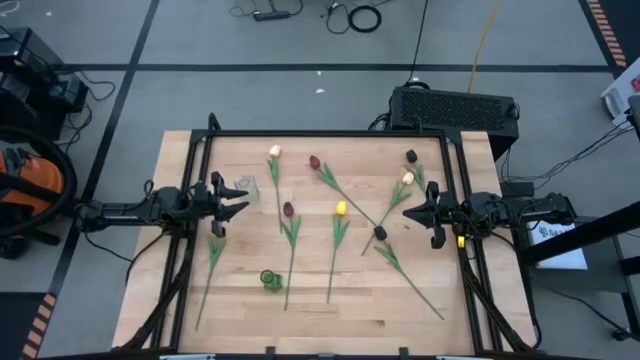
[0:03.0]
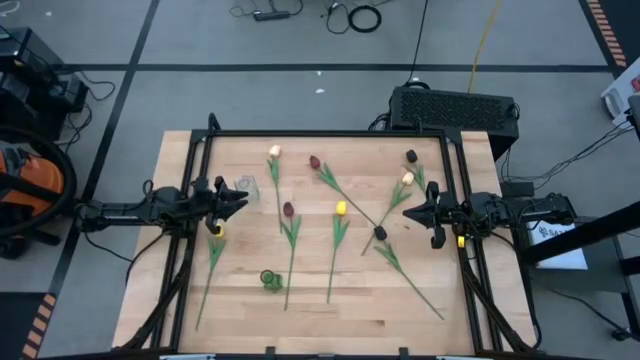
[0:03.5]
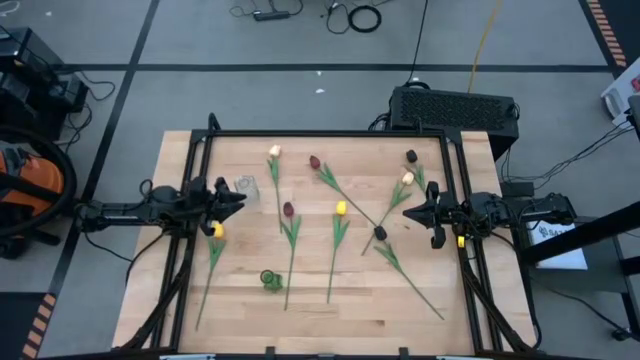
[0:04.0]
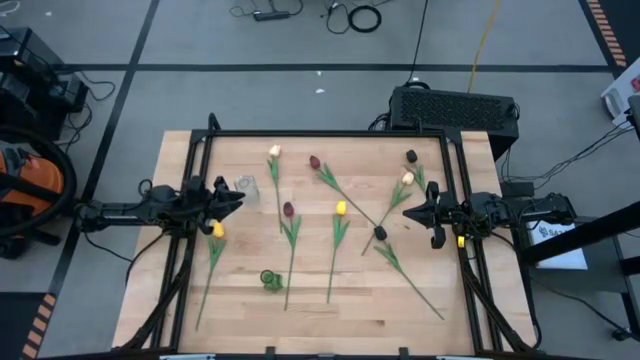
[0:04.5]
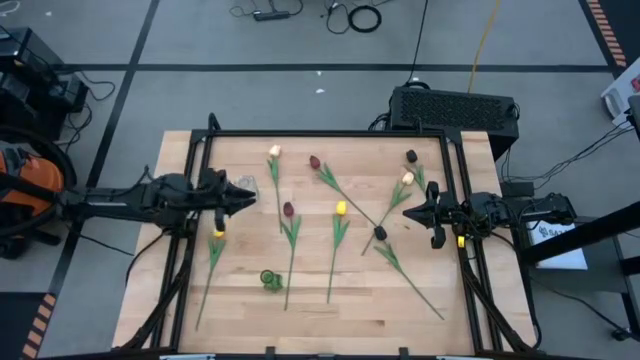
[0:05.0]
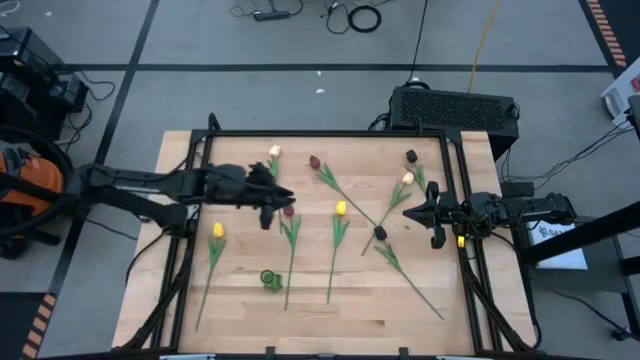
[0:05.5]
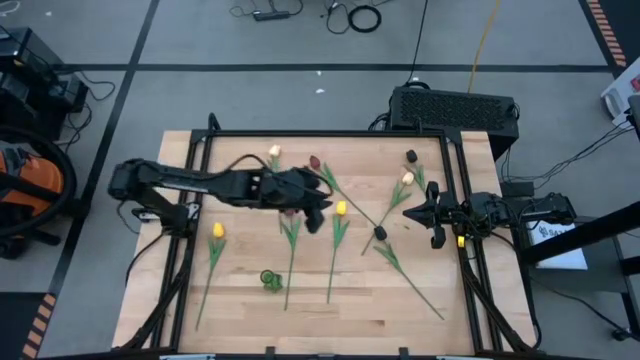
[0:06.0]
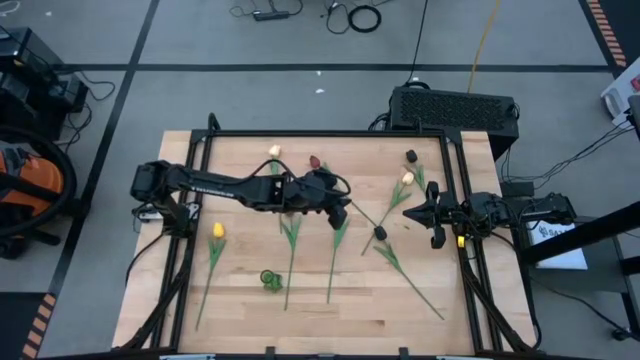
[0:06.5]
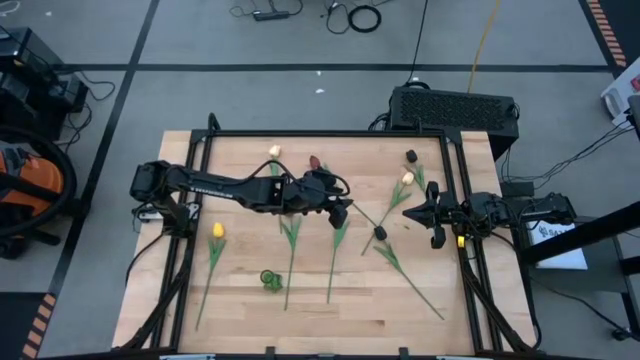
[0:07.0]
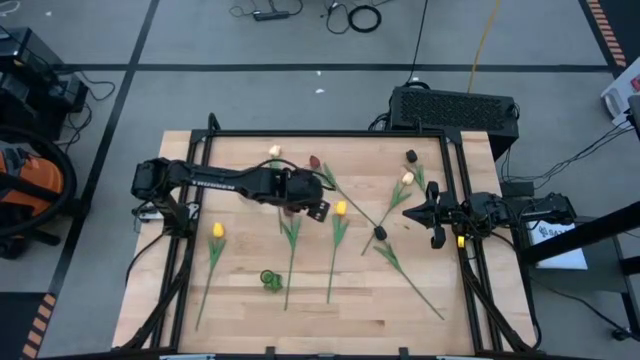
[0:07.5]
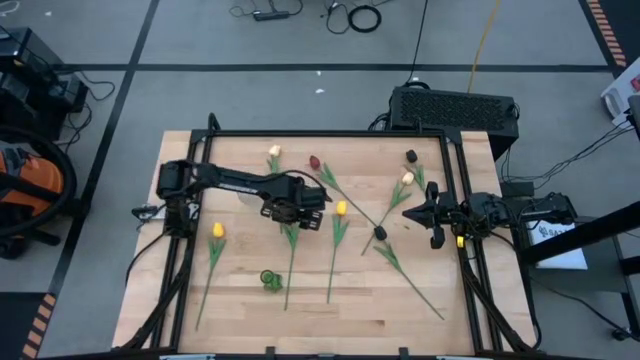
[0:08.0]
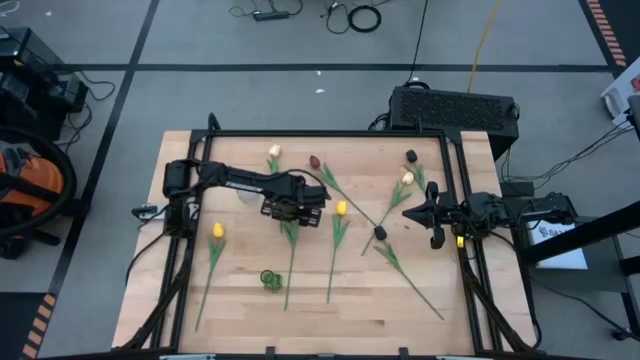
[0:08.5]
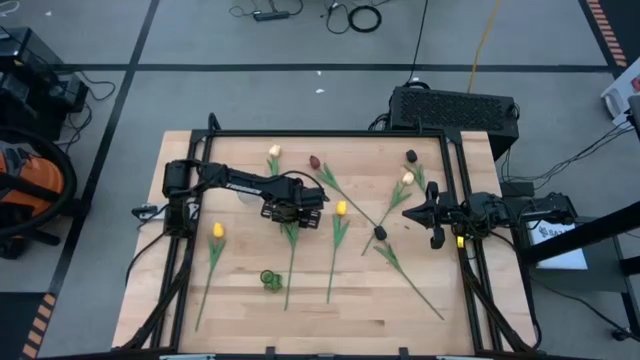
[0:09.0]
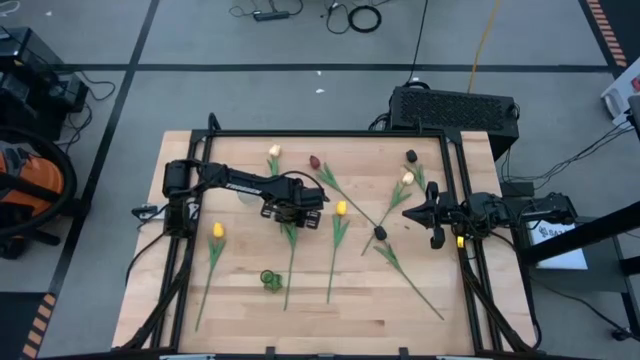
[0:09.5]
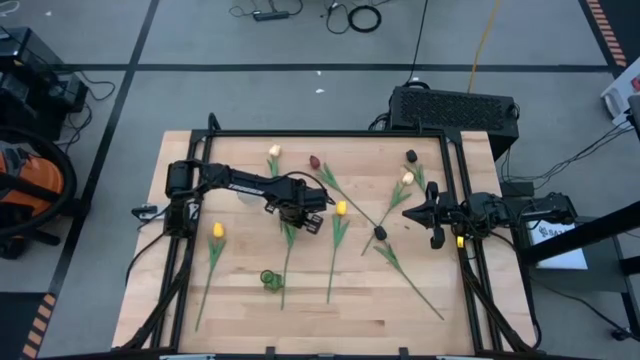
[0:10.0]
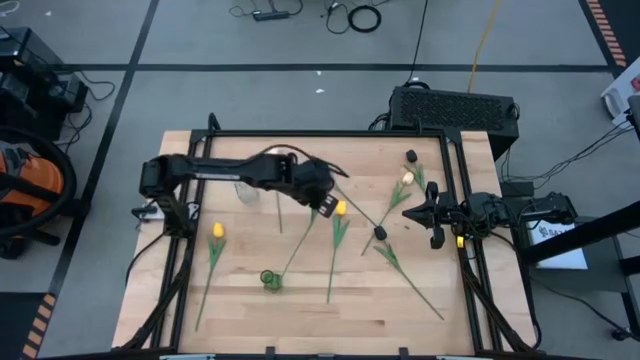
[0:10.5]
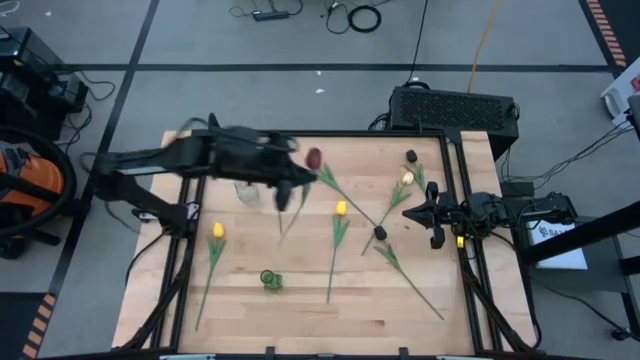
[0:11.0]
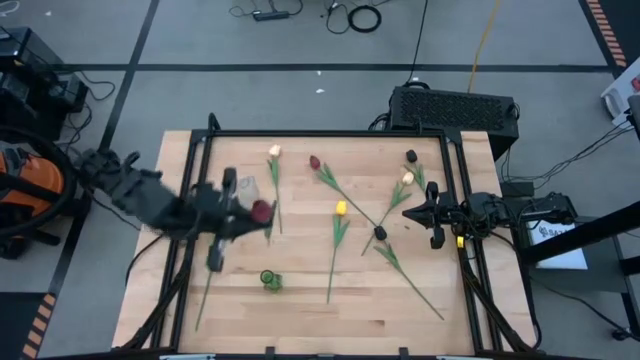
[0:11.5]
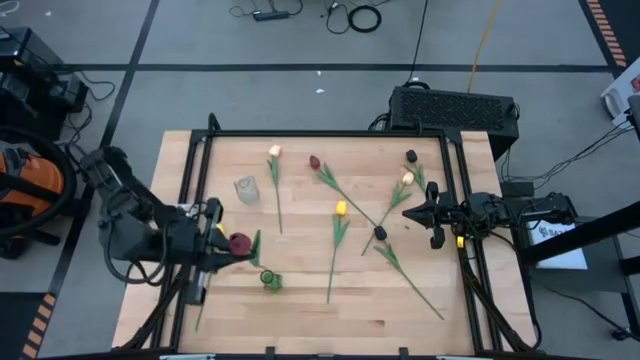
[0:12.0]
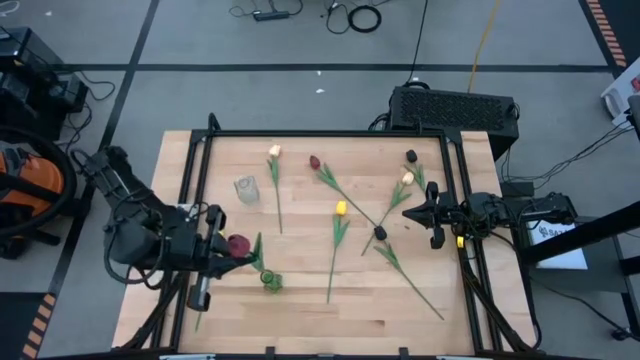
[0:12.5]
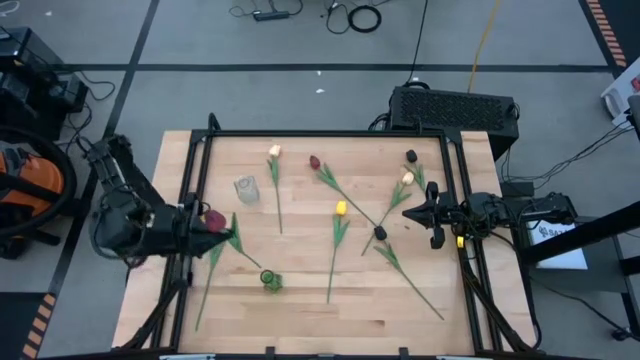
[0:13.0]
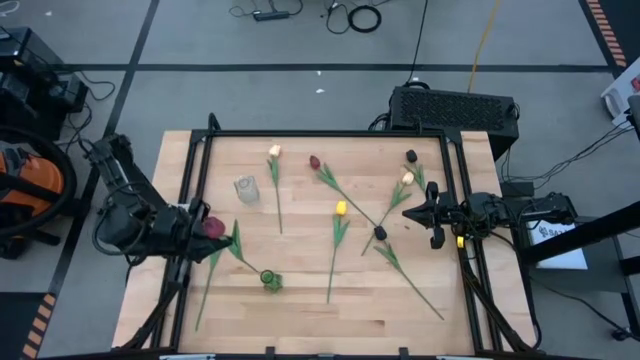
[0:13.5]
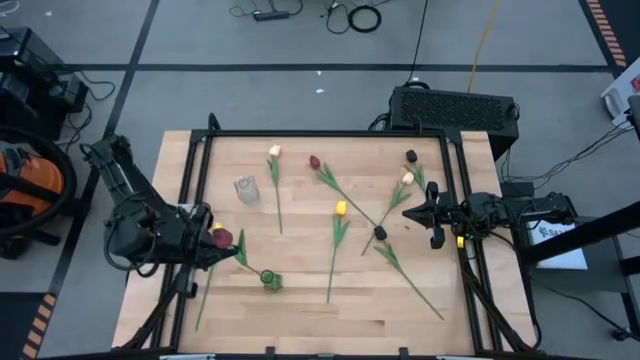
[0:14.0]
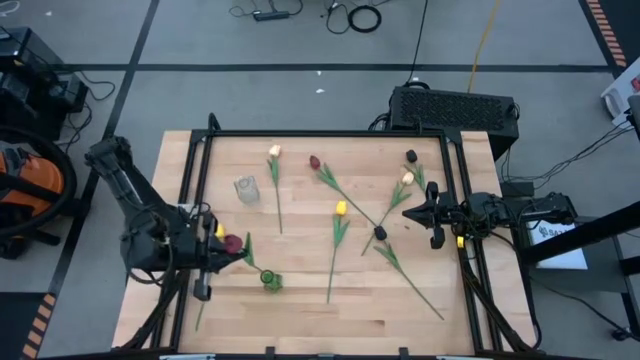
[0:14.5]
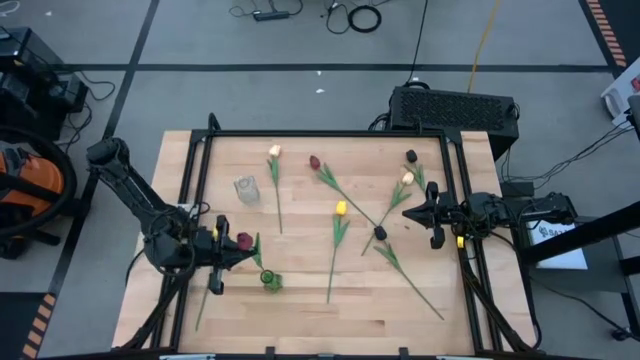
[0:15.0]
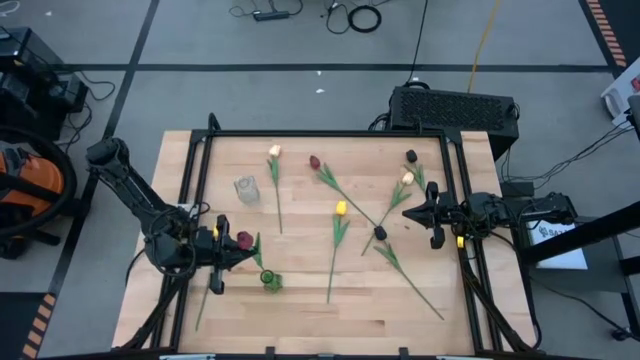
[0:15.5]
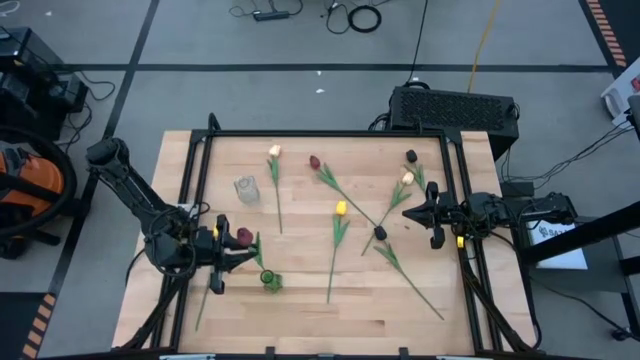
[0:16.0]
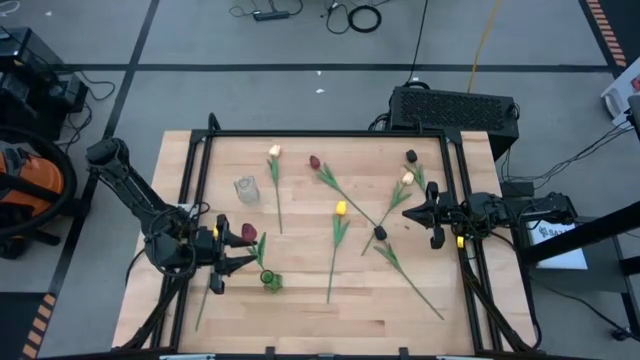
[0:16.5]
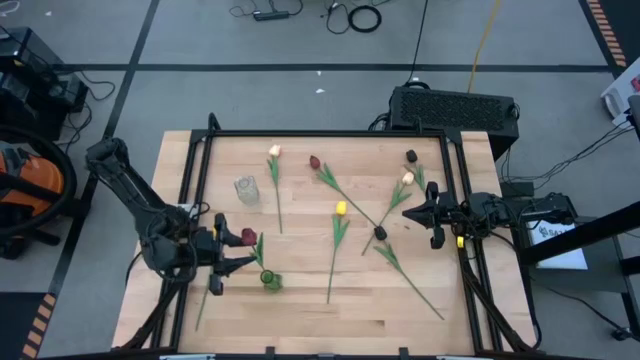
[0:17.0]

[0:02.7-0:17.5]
Task: Sort flowers into vase by color
Put the bottom red tulip into the green vase

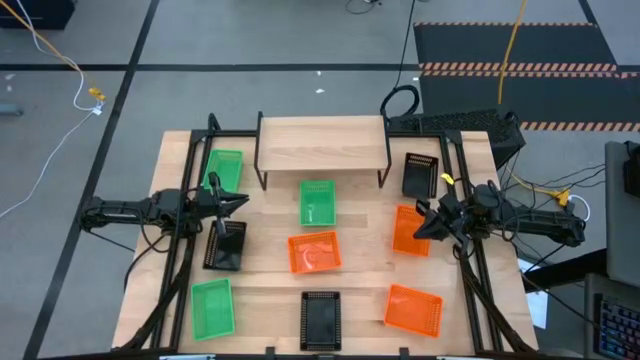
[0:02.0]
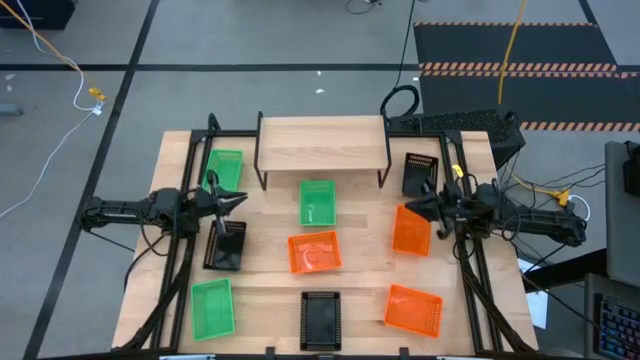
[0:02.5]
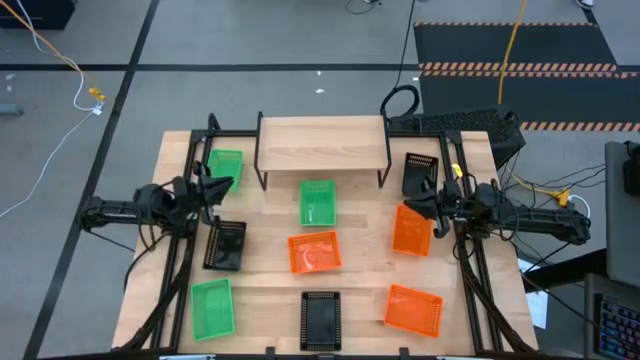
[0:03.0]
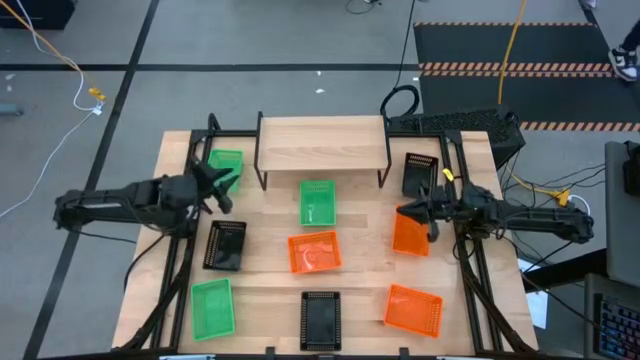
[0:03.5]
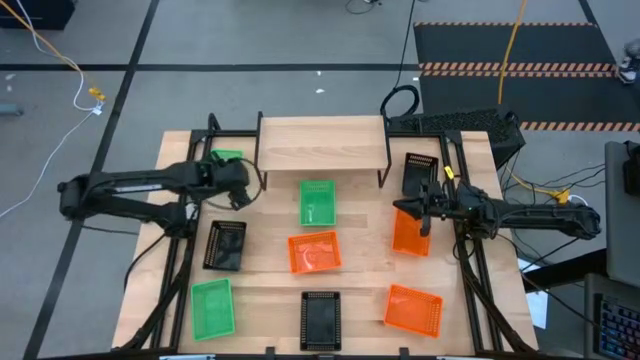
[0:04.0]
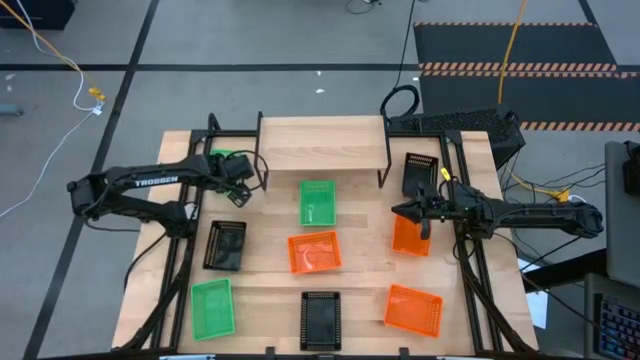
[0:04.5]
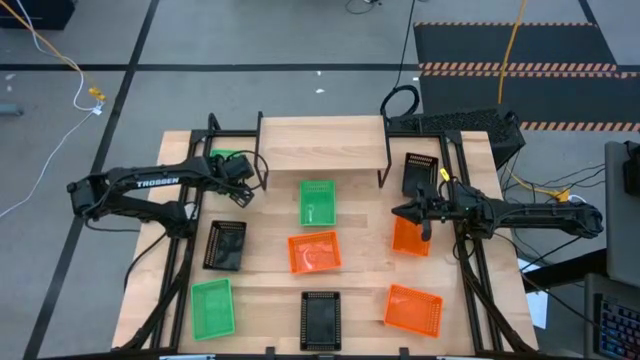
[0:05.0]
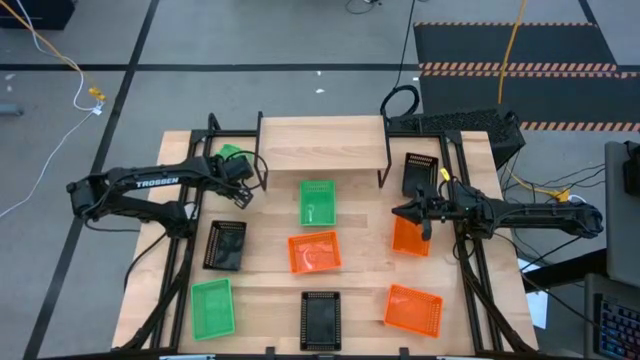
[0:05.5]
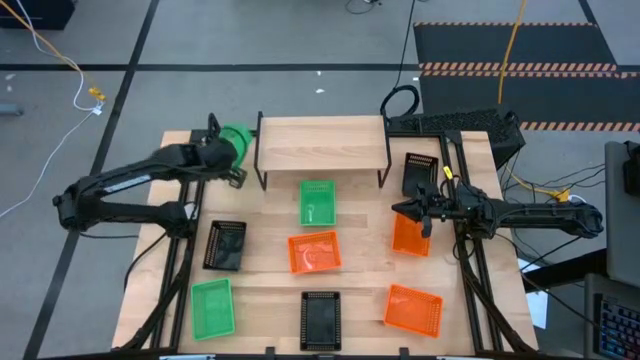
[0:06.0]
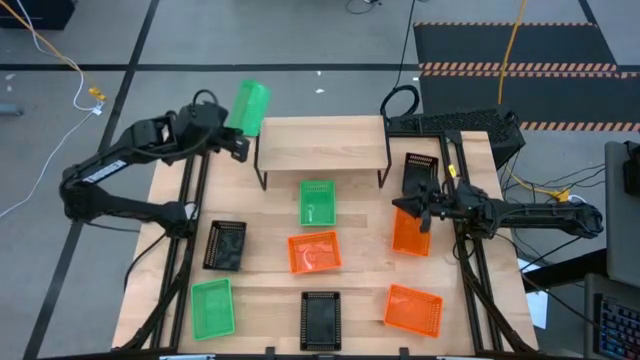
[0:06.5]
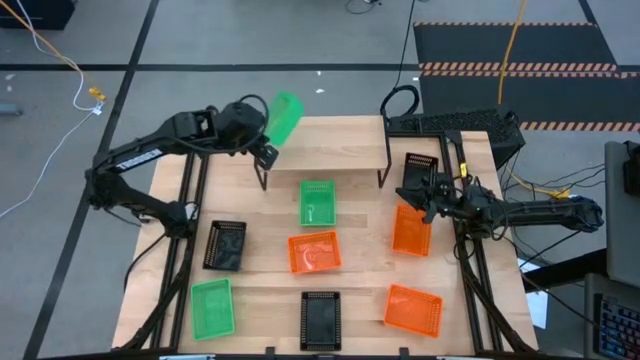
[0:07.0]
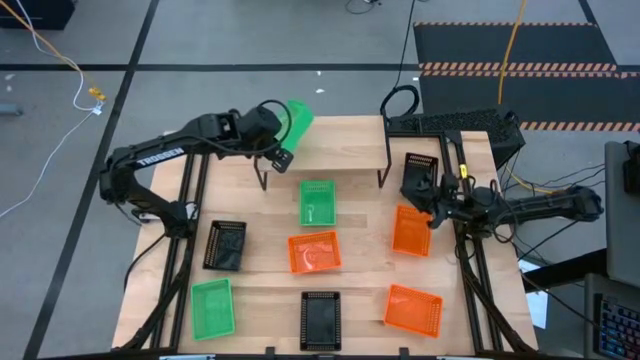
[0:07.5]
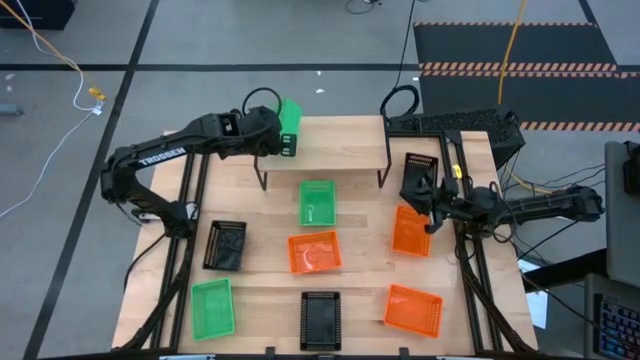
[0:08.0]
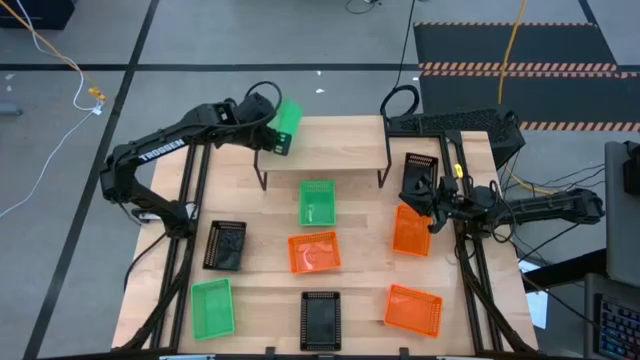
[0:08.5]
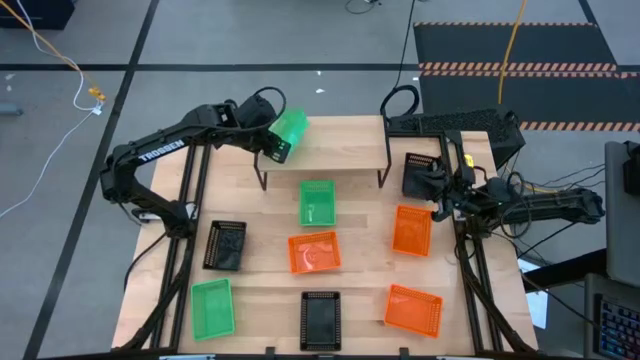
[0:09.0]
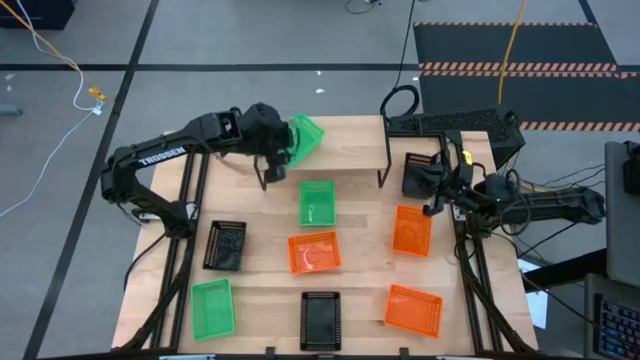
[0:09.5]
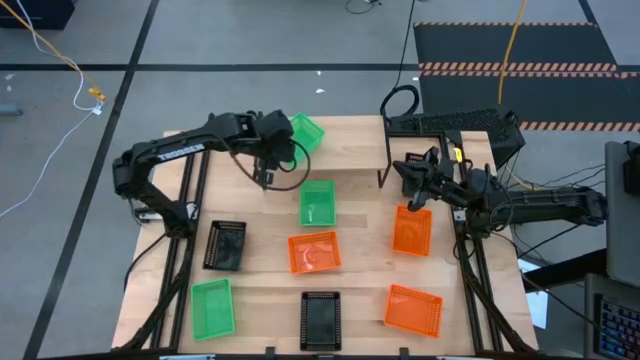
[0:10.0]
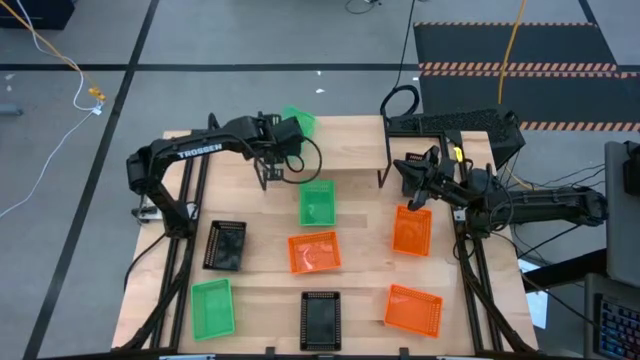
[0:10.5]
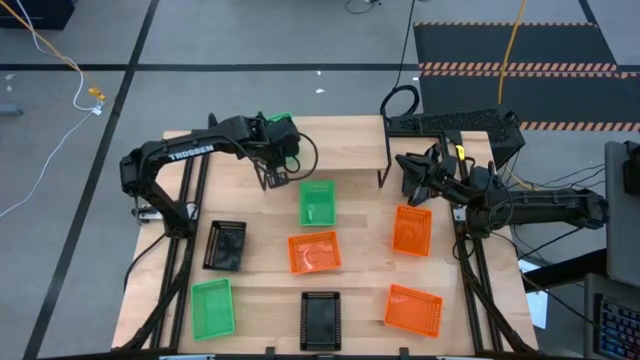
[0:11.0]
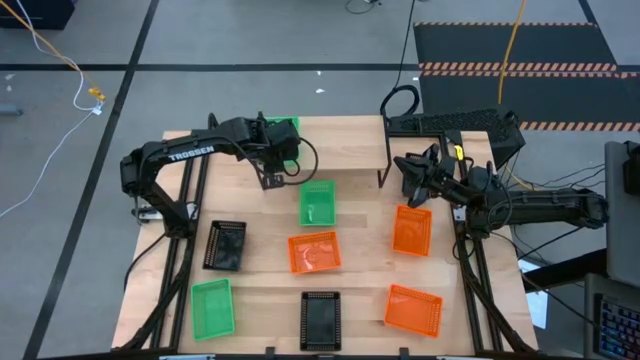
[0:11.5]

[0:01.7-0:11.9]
Task: Stack baskets on shelf by color
Put the top green bin on the shelf
